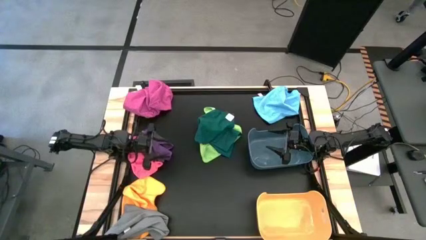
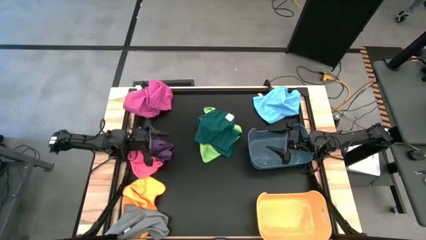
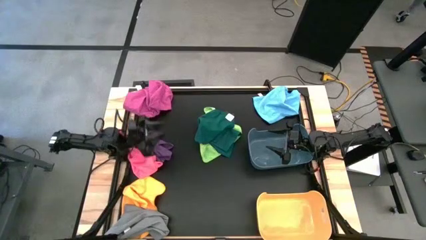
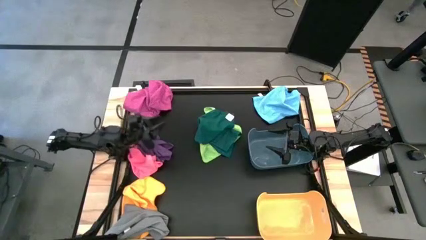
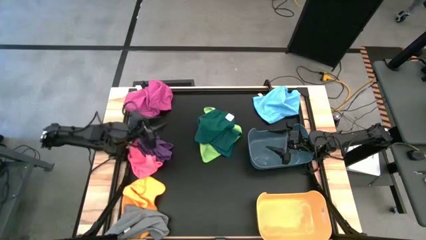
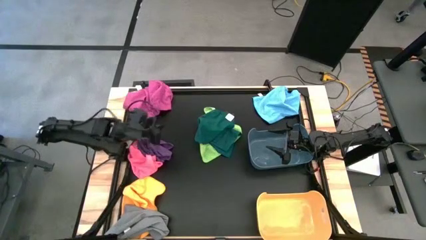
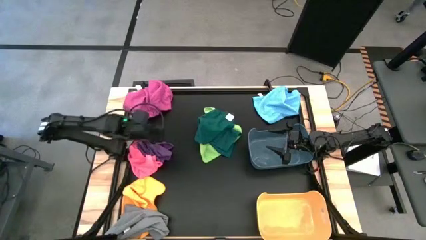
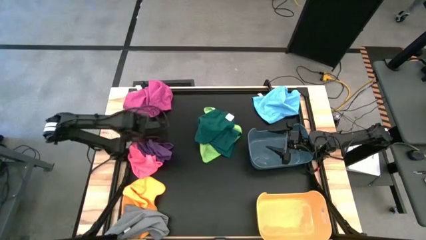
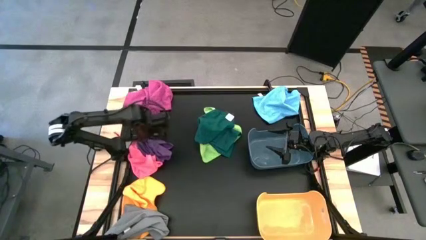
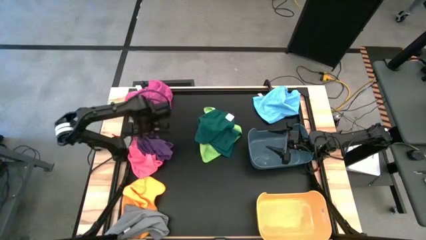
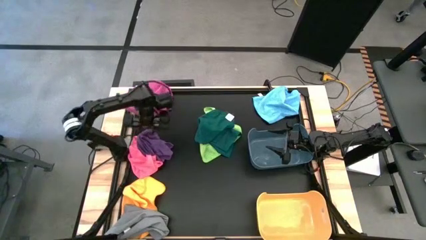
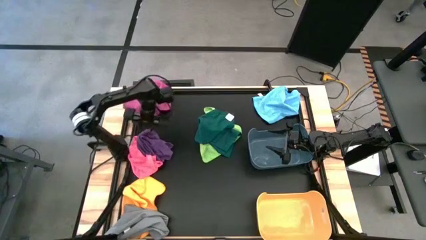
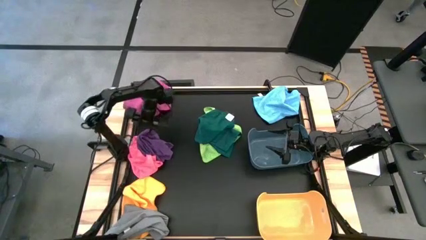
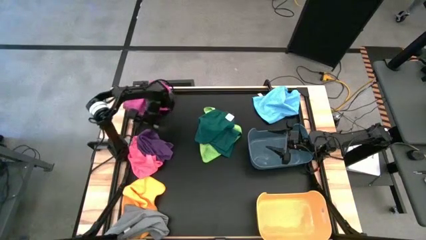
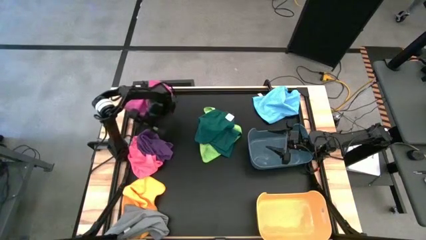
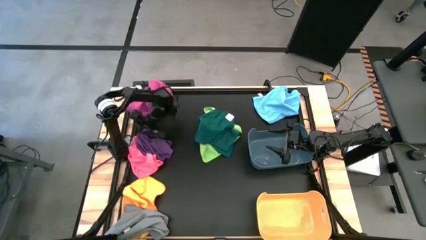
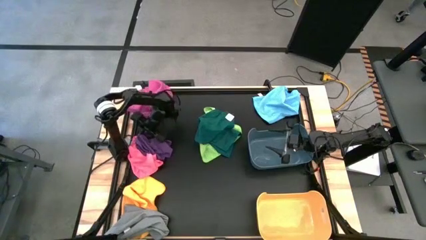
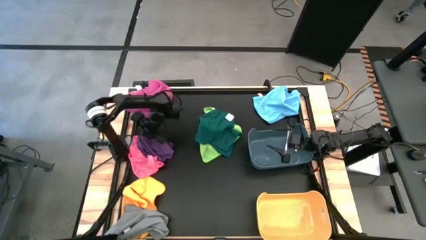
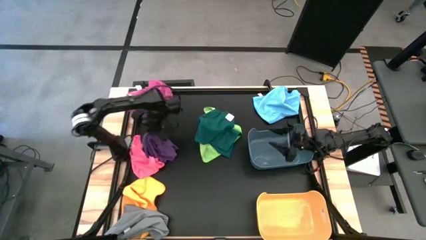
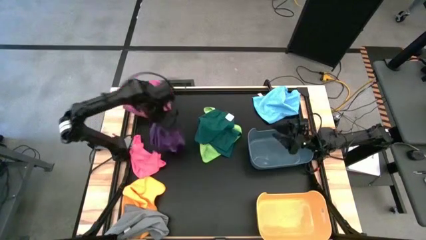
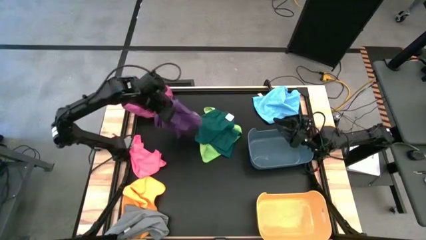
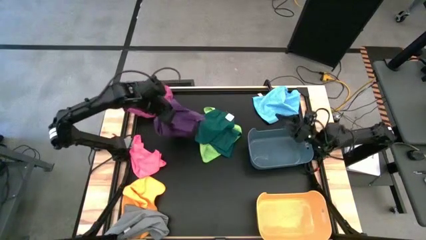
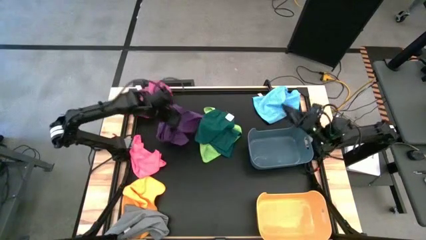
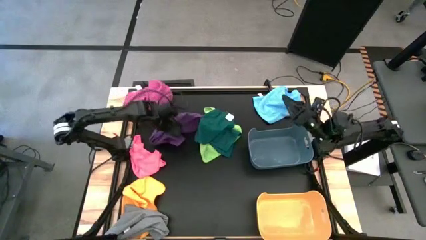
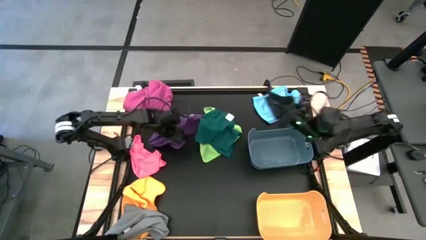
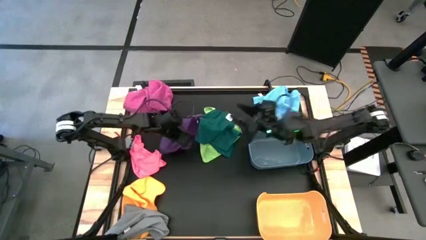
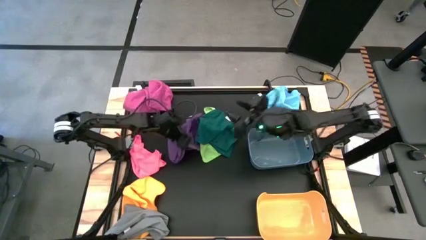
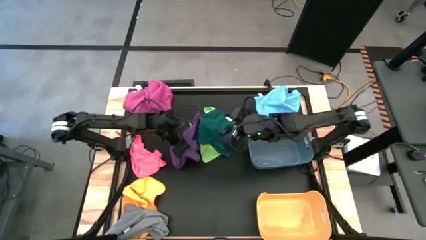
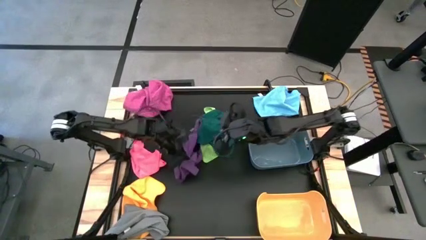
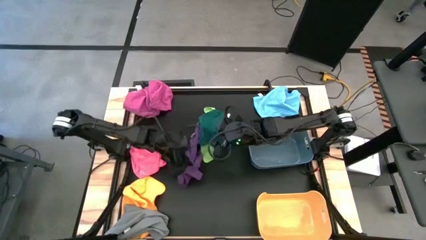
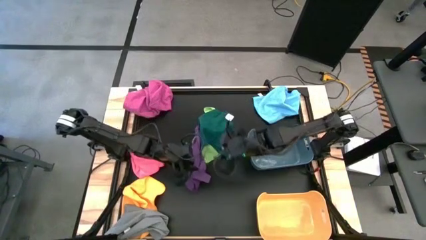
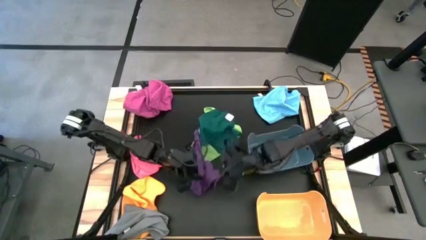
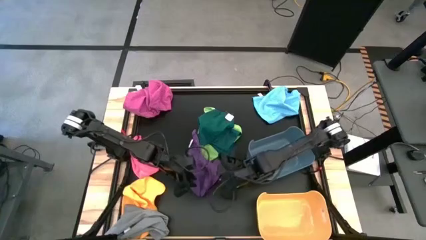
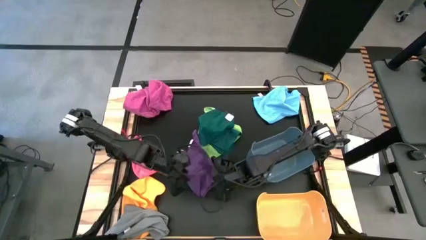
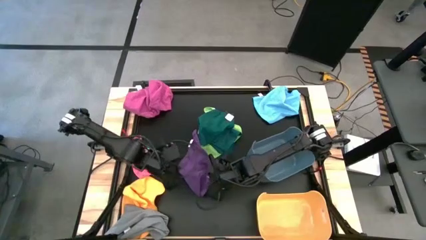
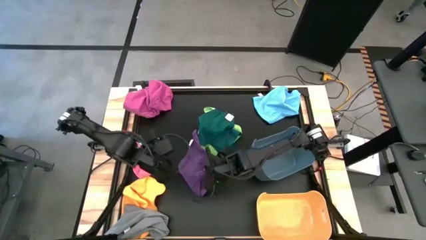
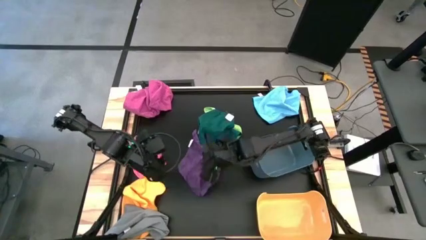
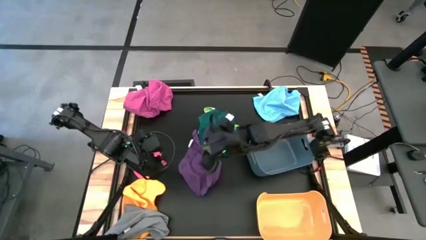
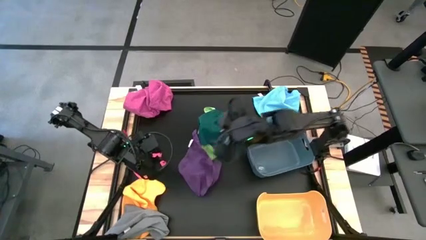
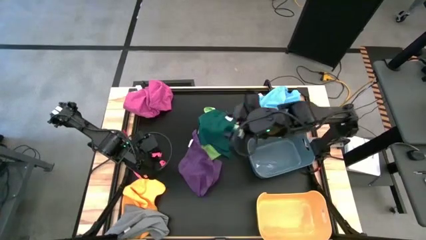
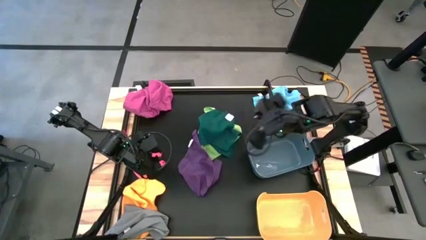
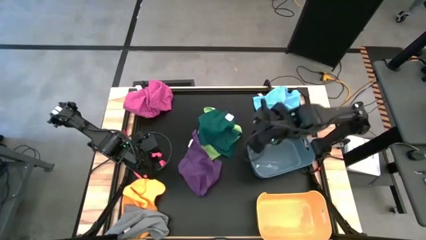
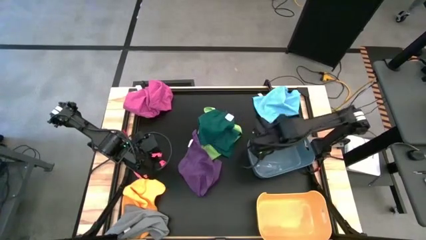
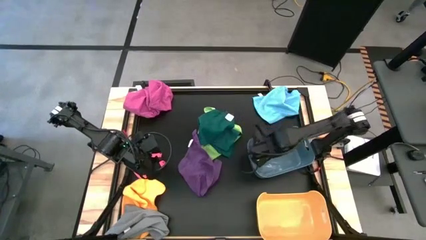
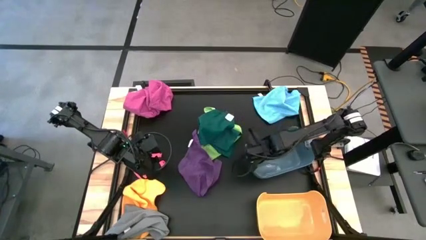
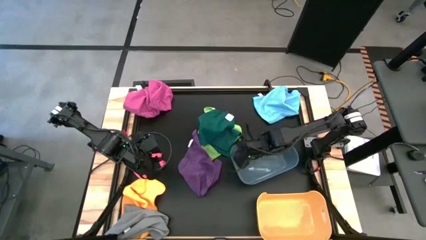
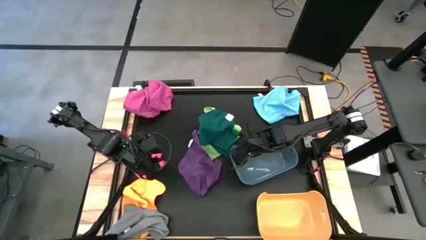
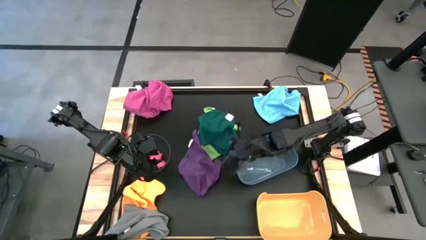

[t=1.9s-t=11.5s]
Task: Sort towels by color in basket
Put the purple towel into the blue bin

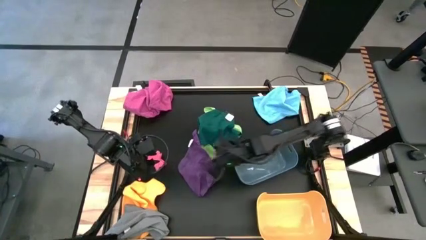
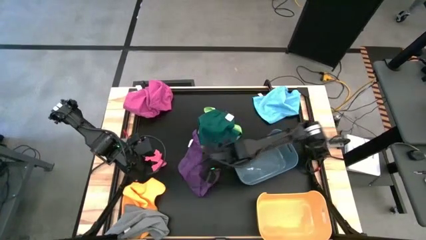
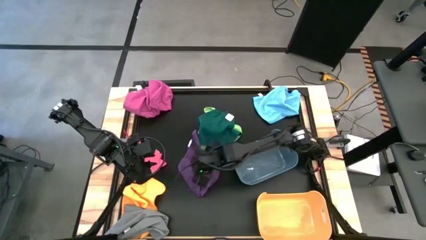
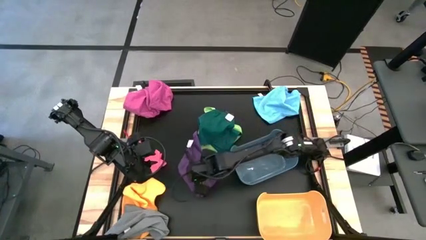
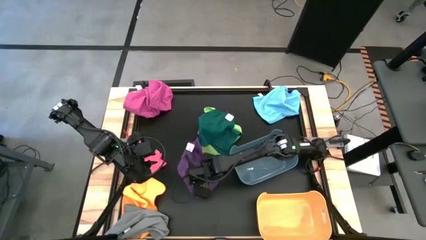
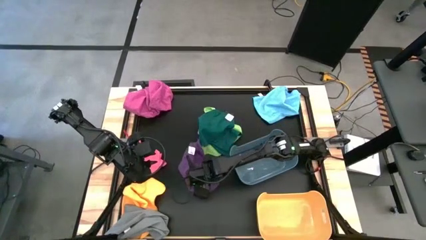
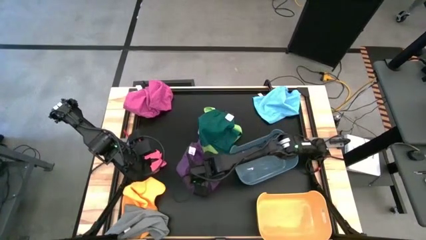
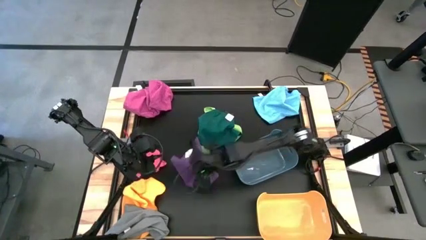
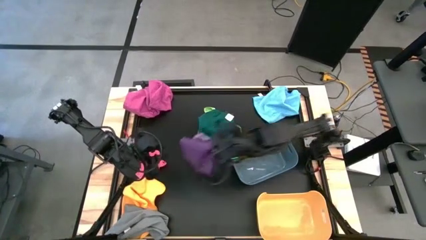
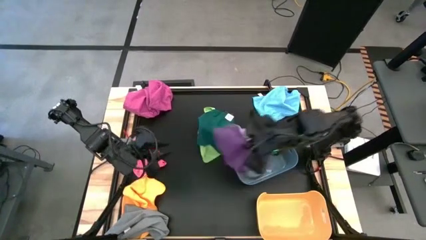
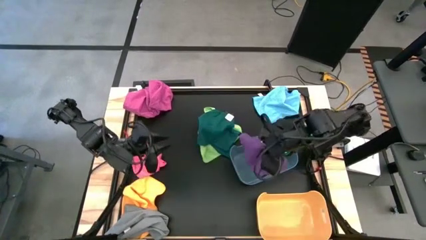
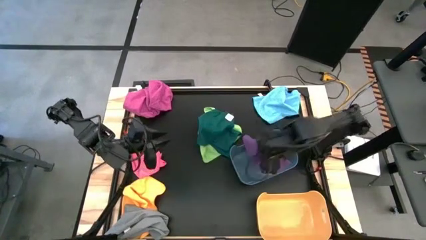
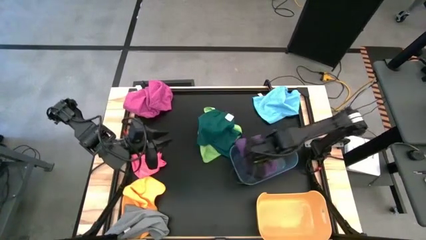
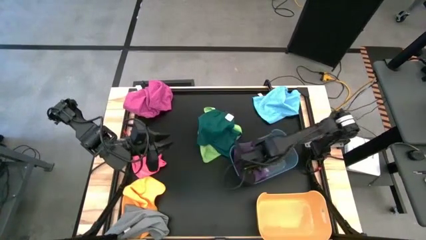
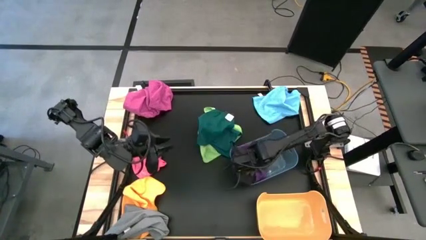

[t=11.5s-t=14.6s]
Put the purple towel into the blue bin

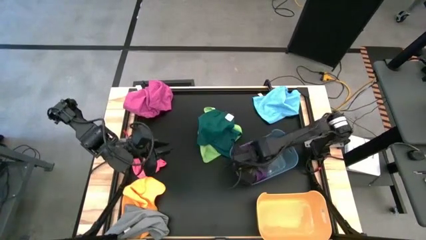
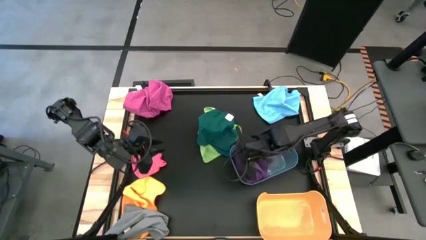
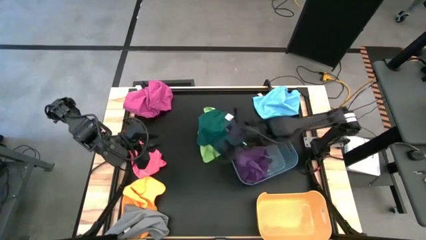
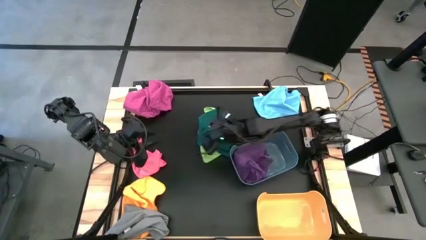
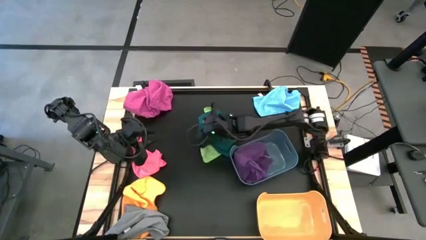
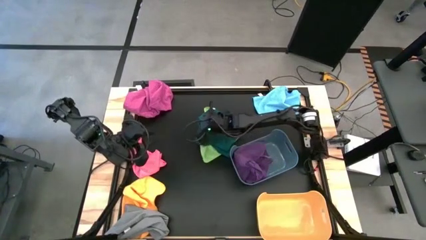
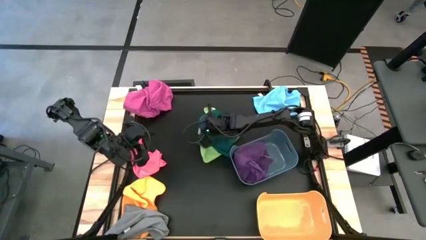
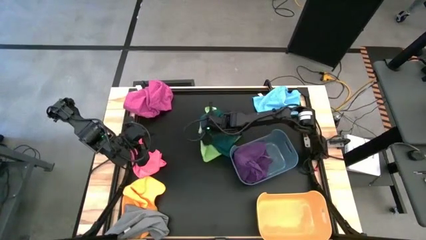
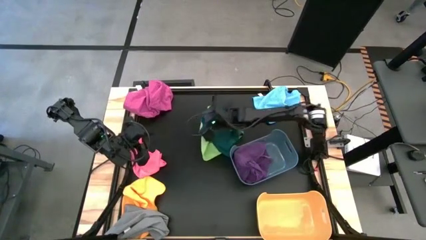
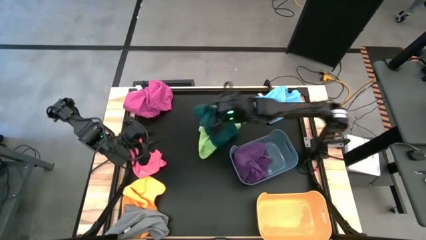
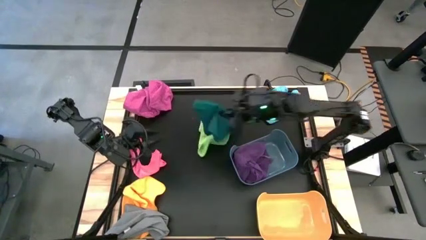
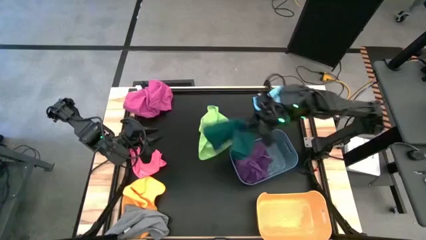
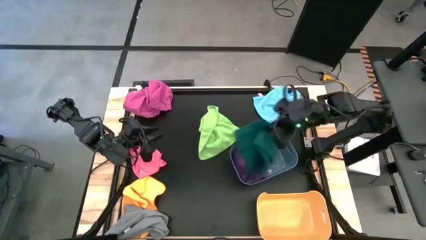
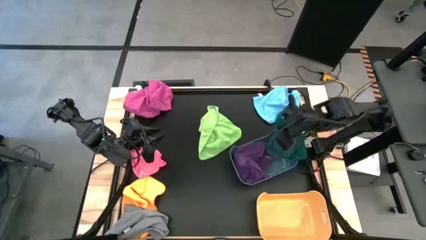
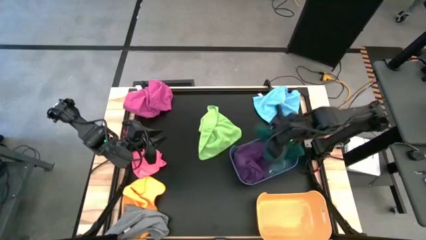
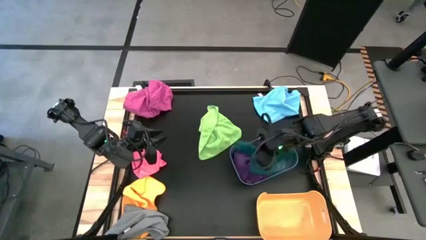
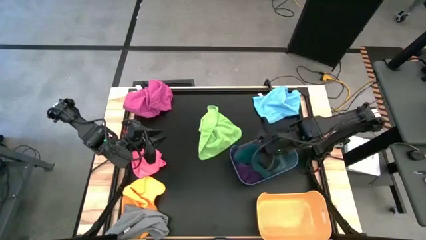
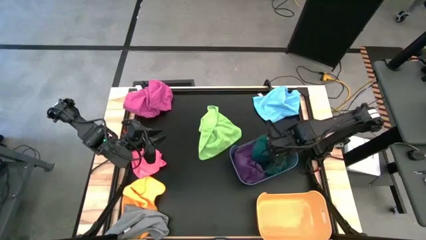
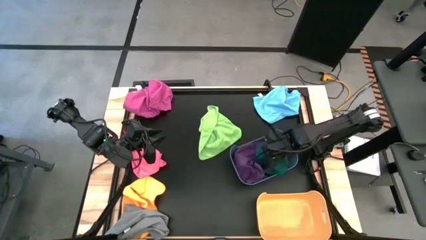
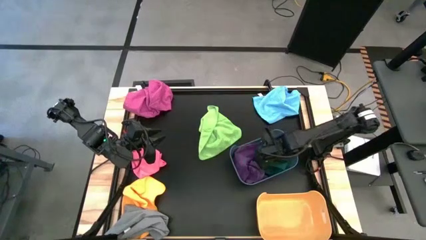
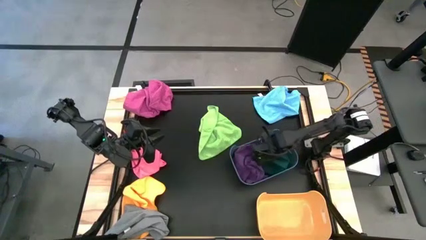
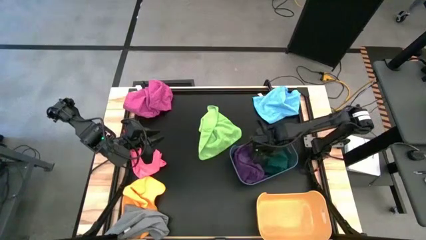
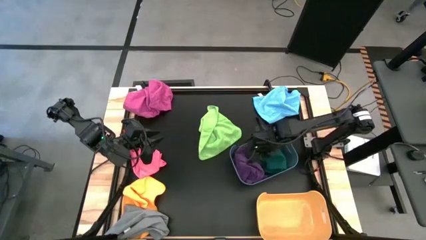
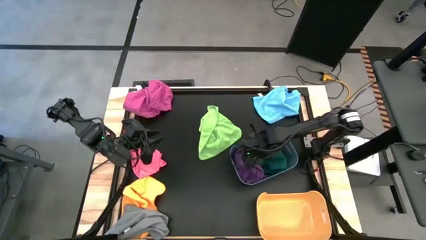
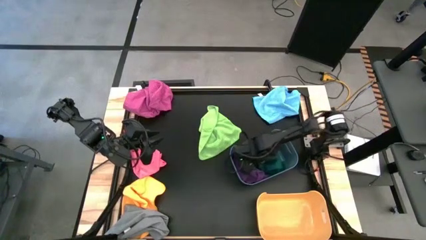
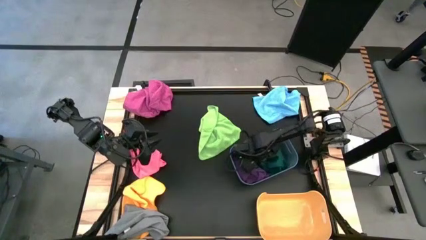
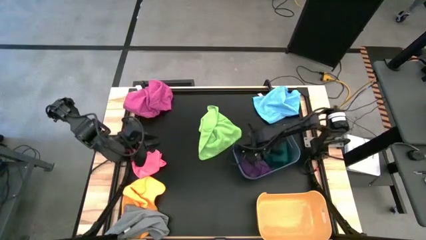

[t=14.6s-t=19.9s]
Put the dark green towel into the blue bin
